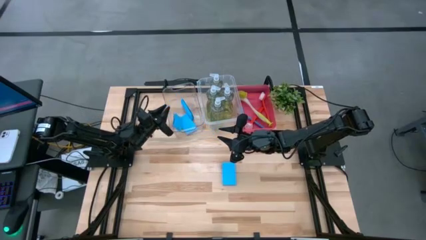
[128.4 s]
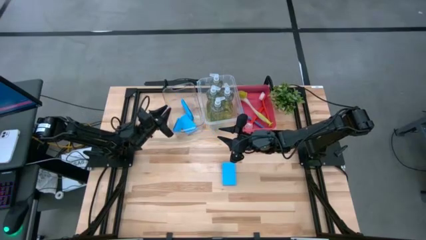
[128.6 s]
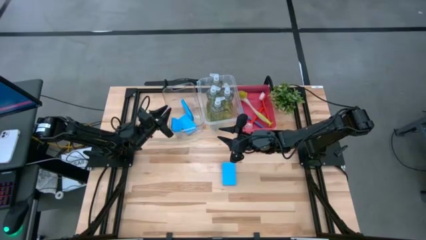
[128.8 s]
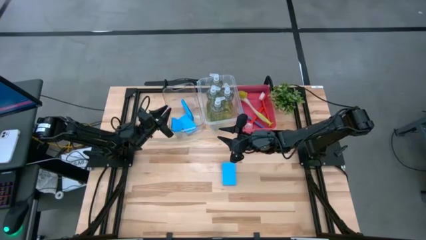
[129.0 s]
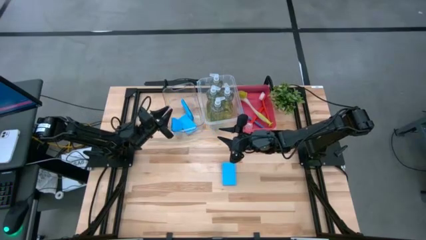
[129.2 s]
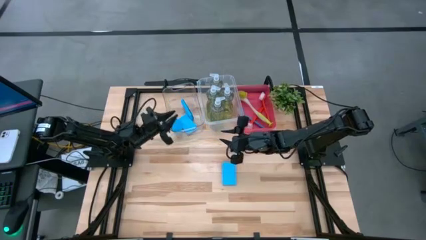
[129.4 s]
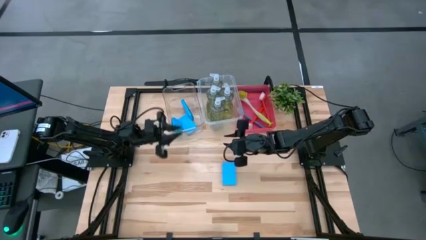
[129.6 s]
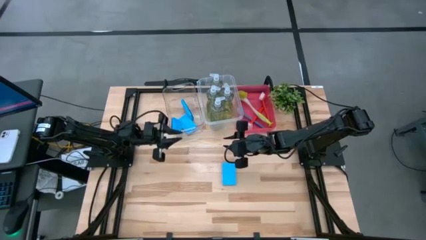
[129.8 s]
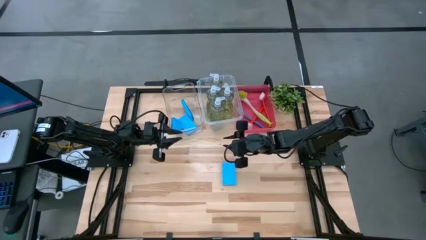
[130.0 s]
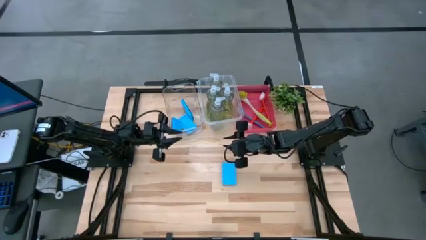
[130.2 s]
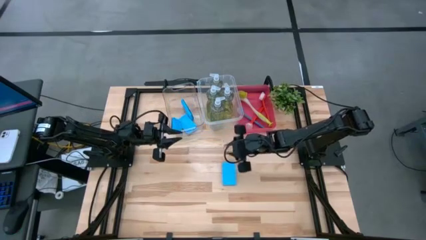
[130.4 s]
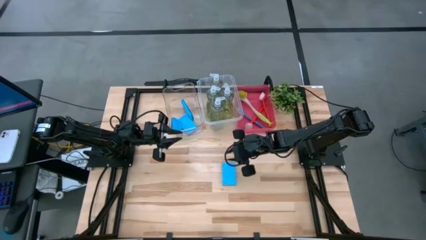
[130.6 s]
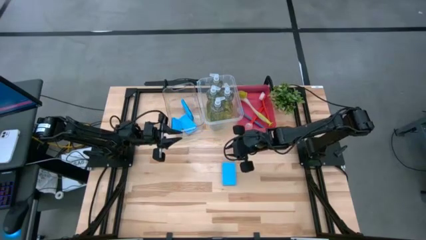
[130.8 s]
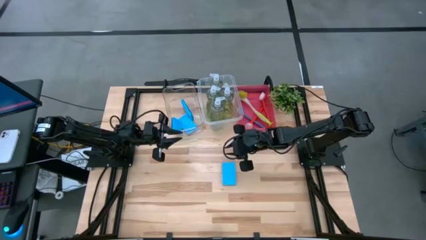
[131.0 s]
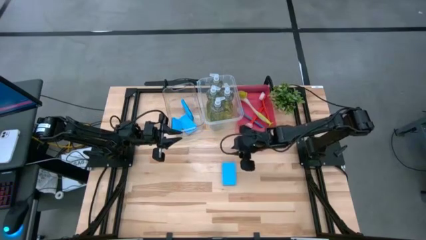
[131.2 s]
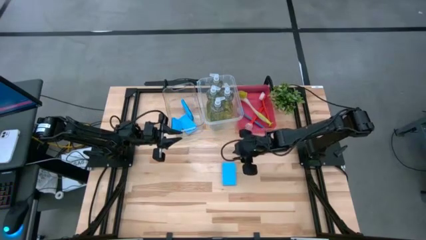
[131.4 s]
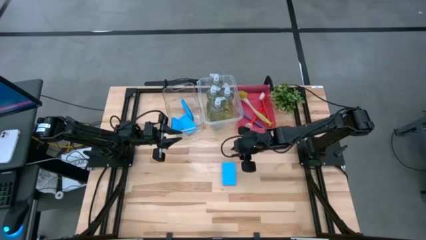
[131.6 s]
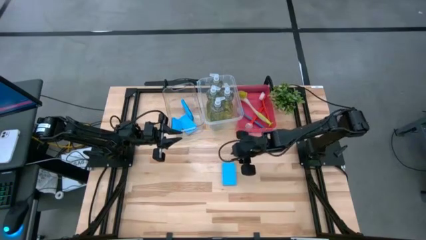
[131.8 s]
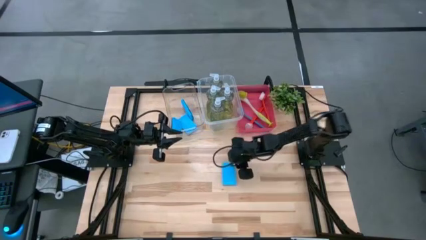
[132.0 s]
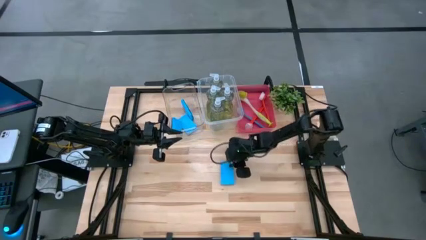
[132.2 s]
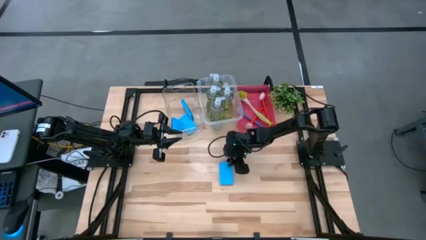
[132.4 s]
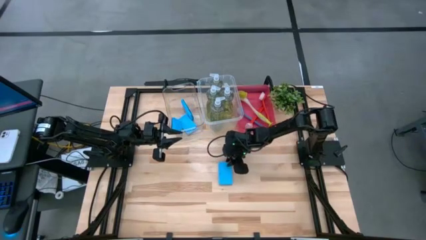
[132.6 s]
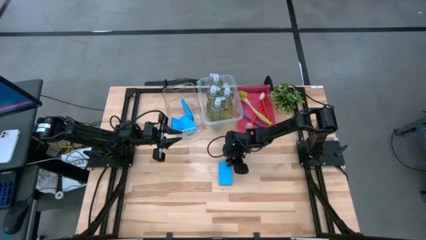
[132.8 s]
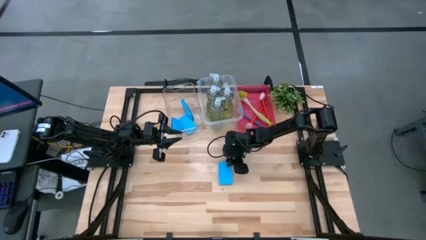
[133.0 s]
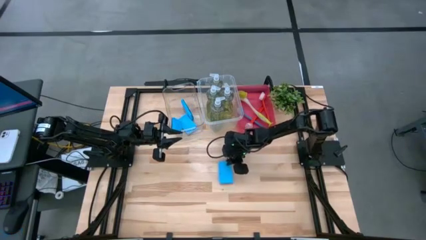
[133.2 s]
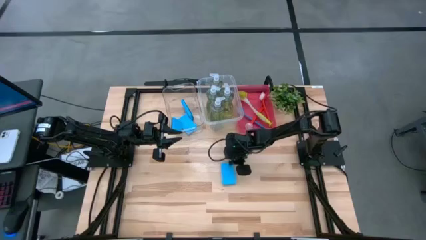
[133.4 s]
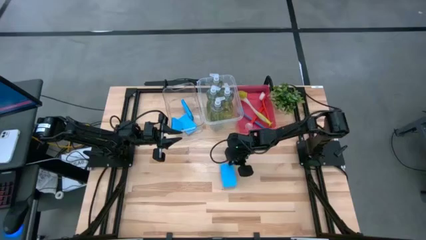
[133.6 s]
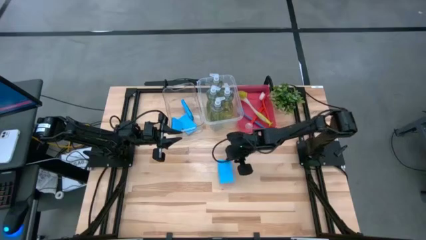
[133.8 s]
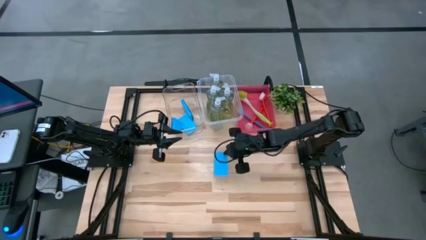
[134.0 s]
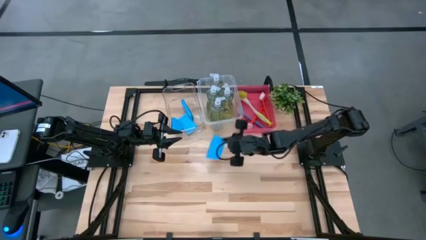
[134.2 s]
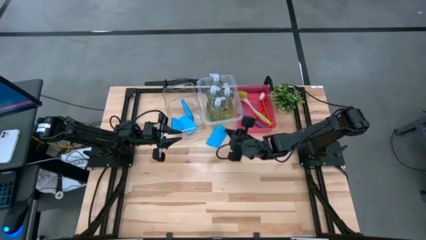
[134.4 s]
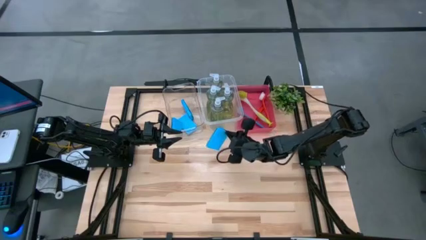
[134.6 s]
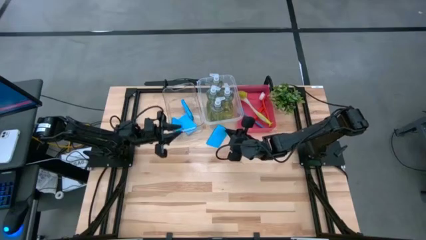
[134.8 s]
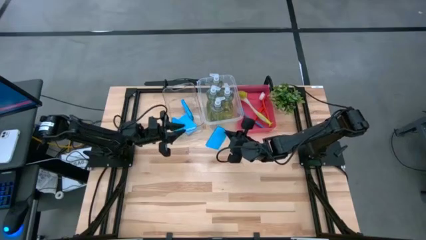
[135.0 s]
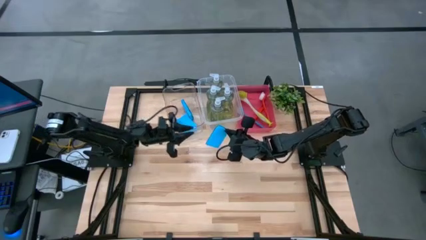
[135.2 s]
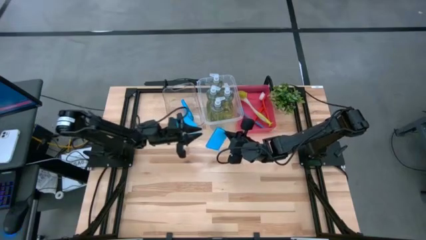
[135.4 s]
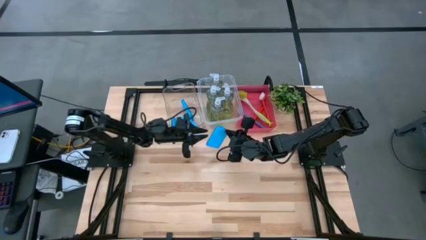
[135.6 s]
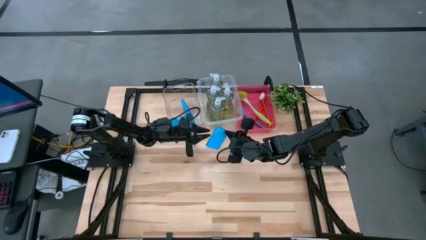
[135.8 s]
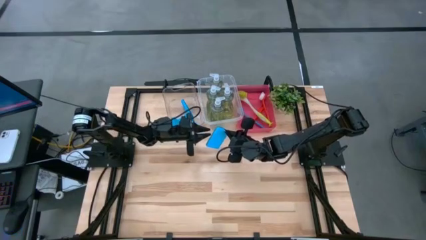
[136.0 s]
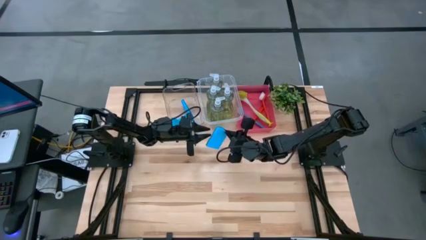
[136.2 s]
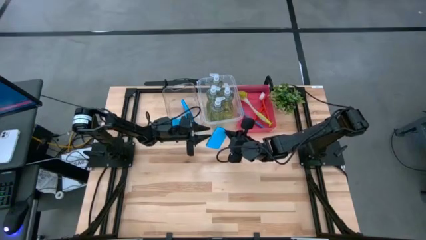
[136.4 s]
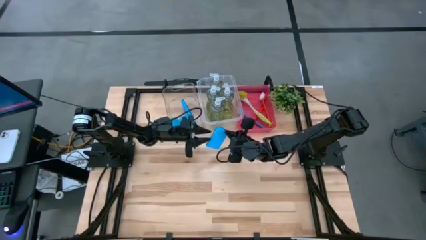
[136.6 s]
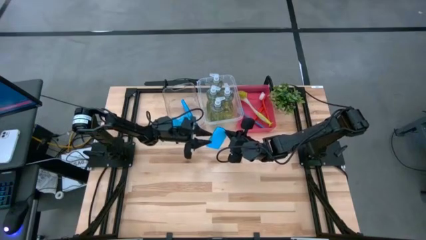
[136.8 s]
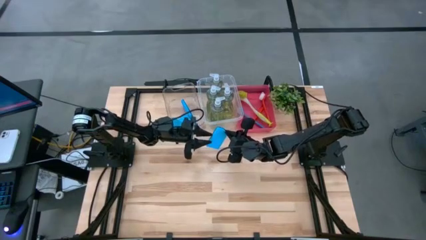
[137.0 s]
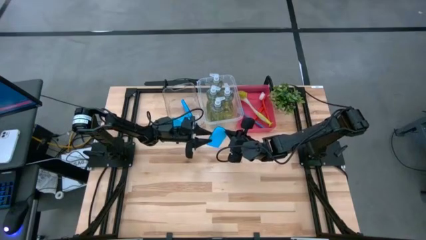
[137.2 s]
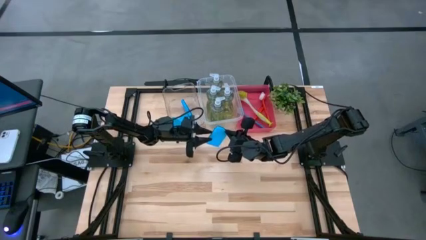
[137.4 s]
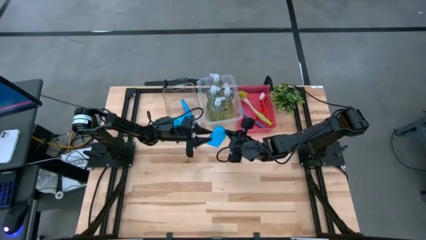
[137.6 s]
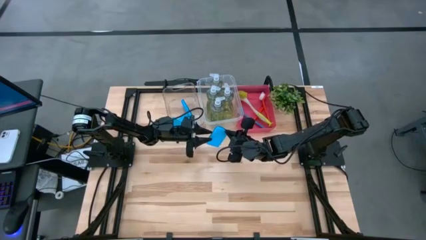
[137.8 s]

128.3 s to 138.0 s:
Task: Pick & Place Kitchen Sink Supplies
Put the blue sponge into the left transparent bin

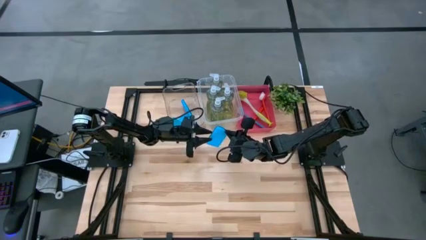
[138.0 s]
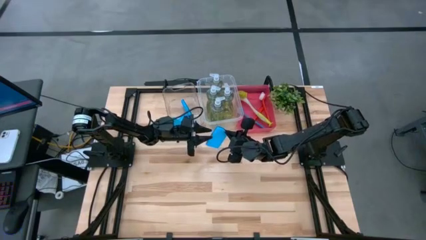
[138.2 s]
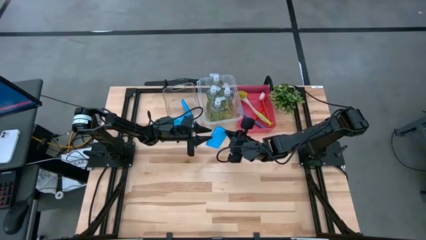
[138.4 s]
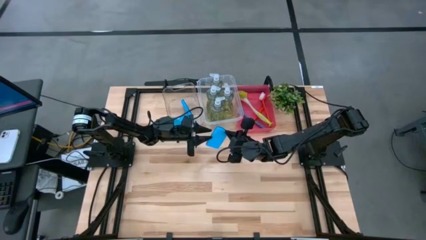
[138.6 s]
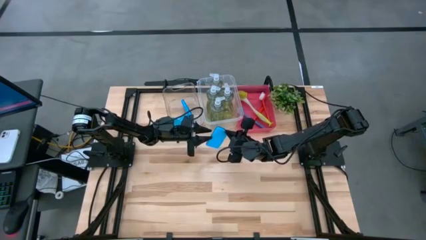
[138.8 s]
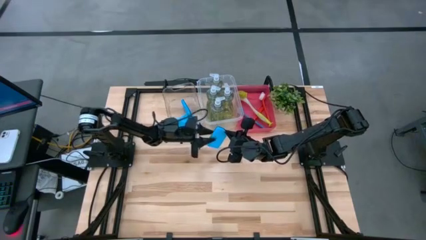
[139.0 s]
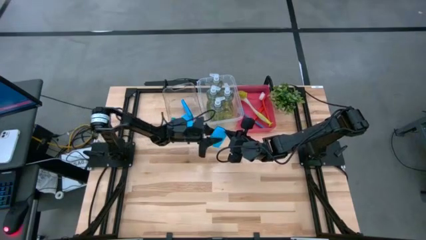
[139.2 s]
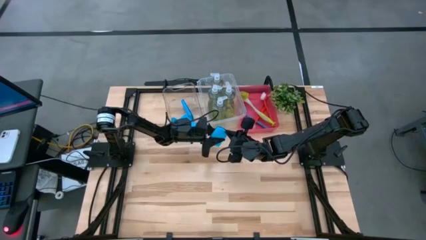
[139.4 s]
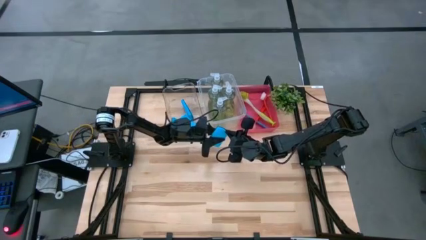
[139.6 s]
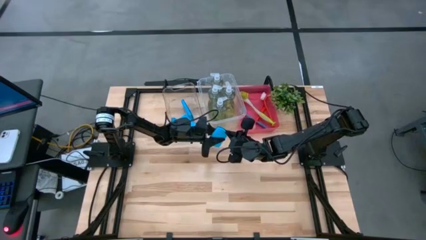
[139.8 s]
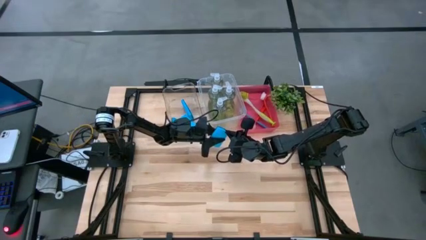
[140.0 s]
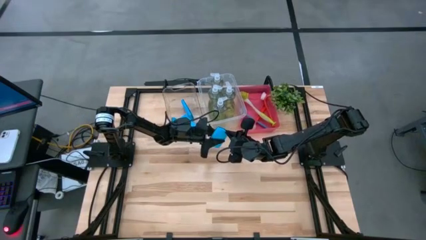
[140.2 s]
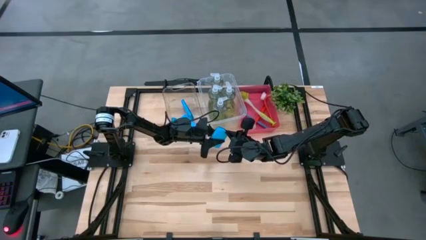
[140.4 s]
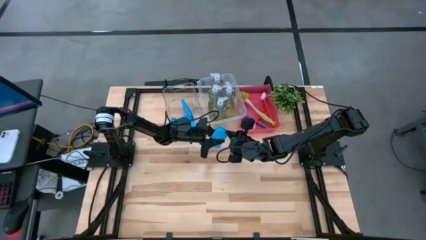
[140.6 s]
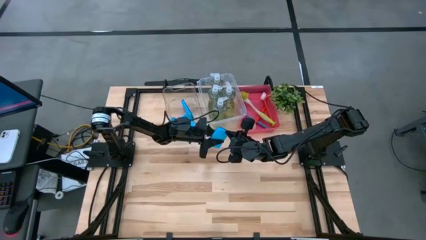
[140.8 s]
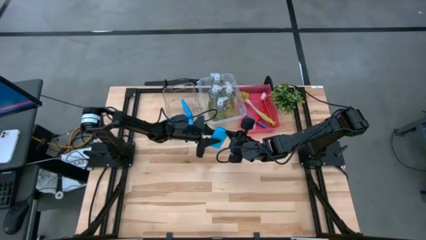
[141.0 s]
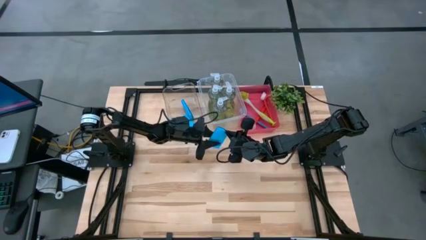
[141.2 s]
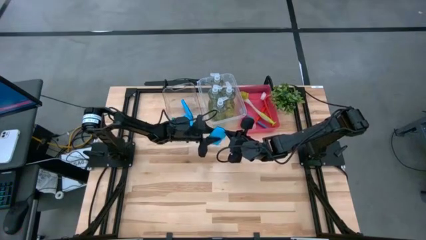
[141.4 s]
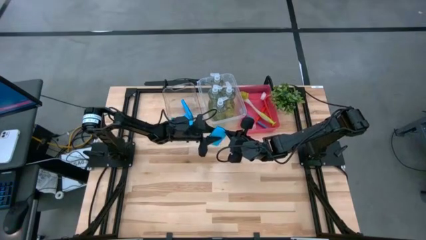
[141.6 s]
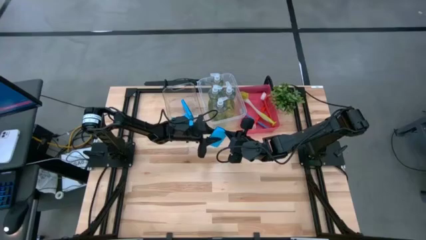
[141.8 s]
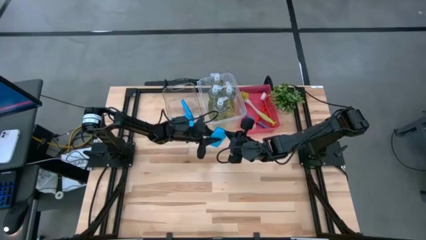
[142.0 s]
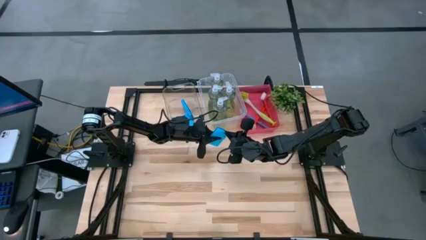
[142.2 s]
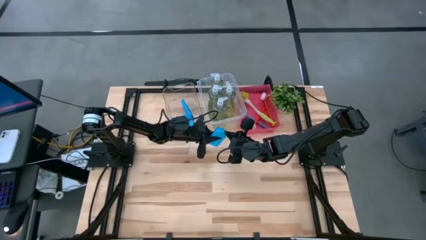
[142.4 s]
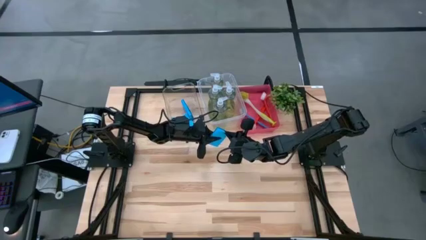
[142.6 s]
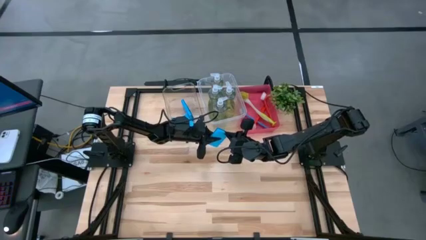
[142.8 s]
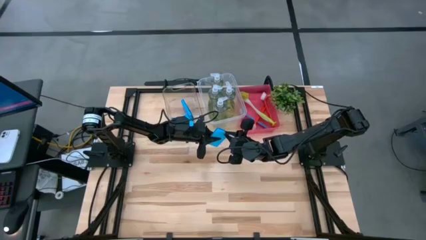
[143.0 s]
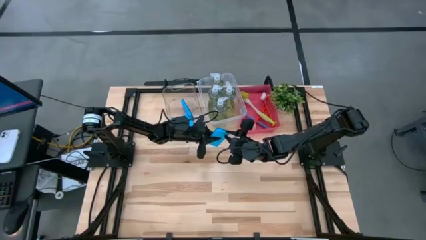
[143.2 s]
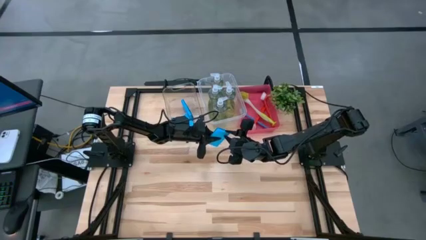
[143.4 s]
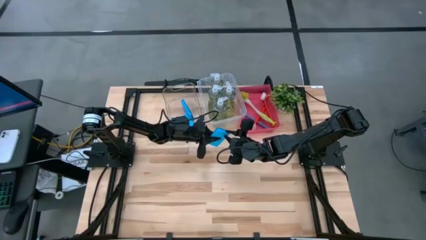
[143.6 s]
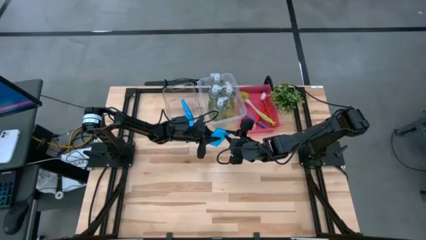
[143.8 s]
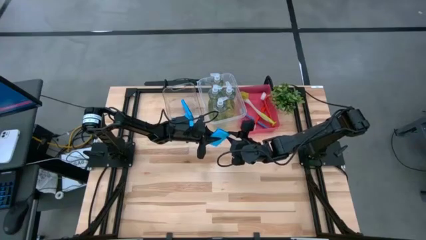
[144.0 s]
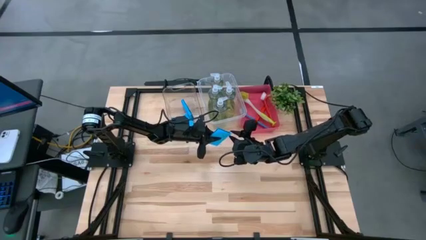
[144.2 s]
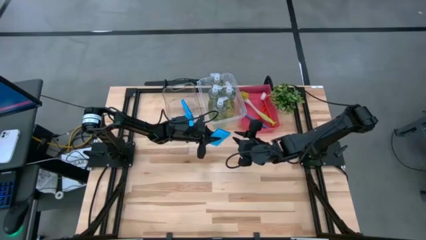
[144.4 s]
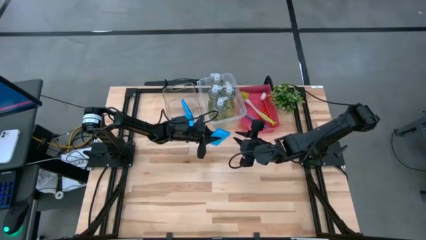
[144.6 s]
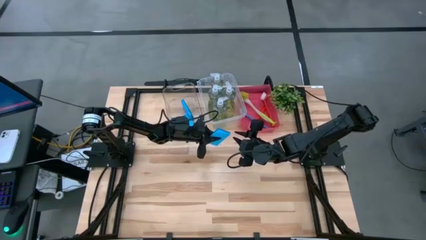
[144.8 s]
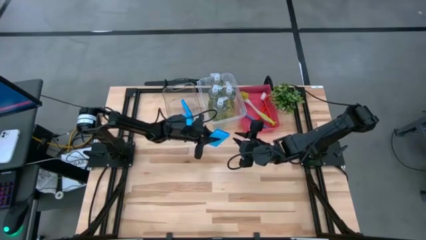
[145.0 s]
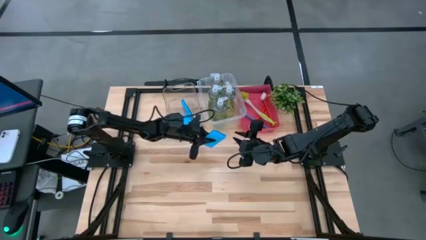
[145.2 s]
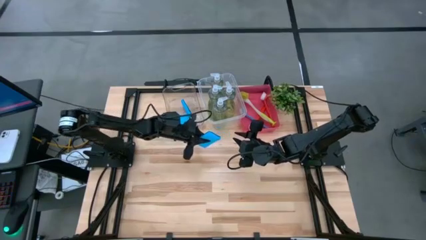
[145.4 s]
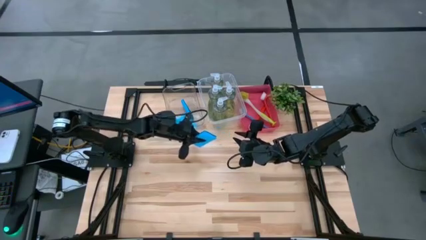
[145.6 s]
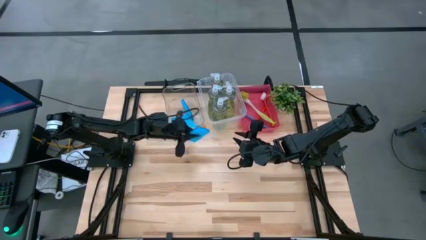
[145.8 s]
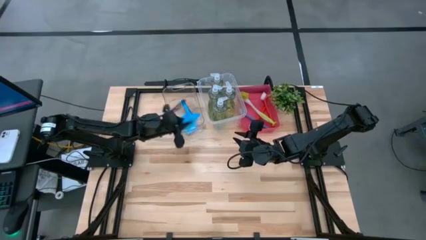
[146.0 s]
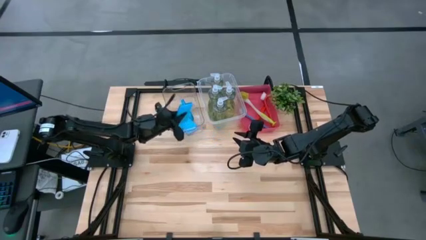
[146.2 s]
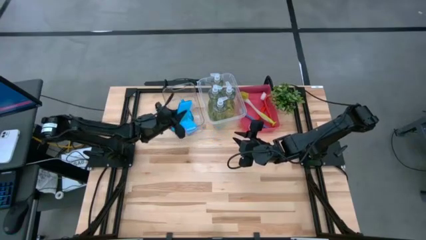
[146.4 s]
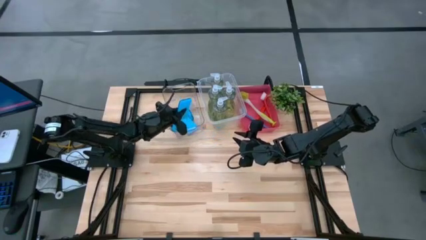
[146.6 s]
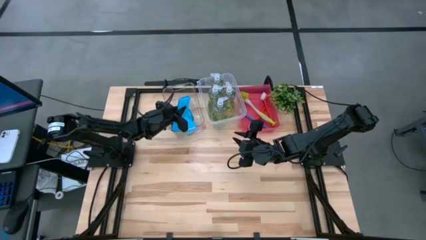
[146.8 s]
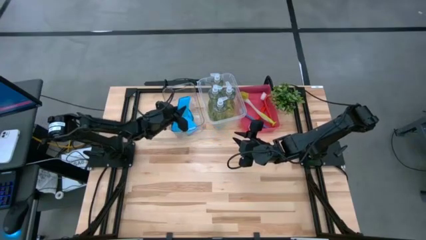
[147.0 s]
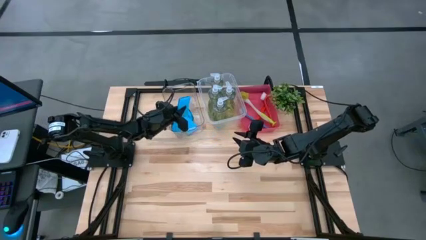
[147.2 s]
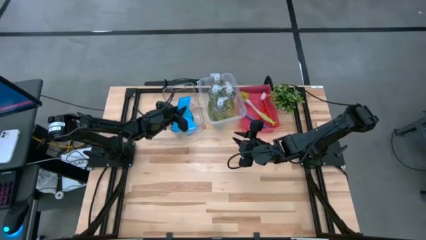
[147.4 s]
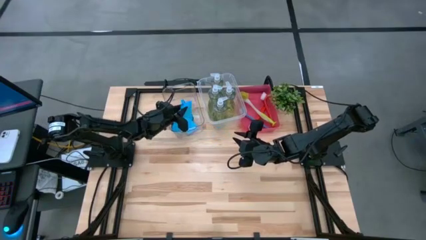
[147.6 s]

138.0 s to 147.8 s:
Put the blue sponge into the left transparent bin
